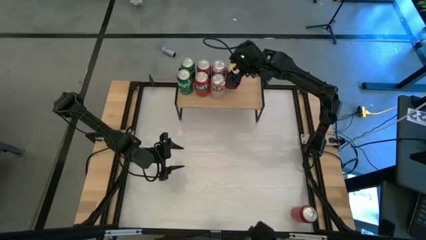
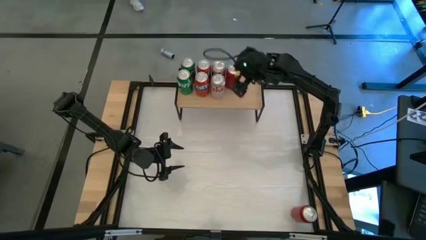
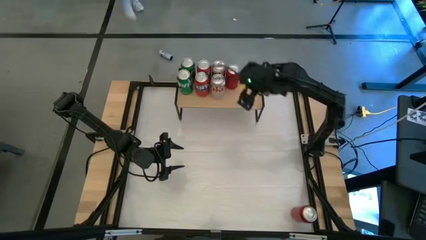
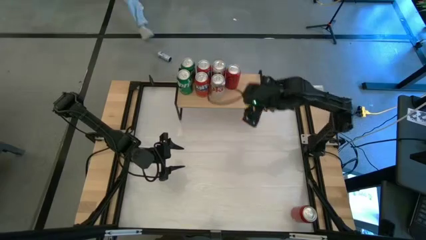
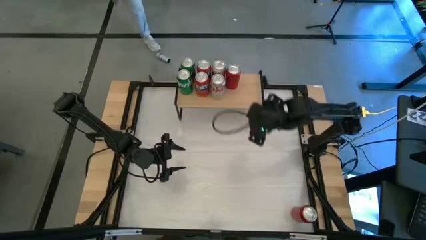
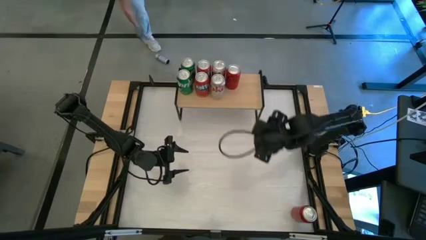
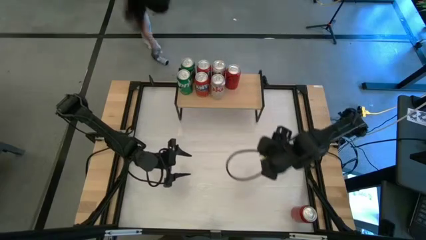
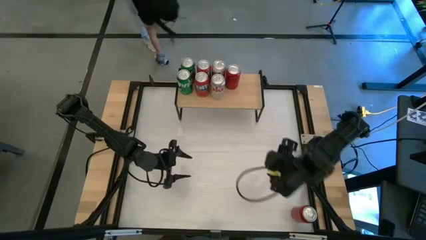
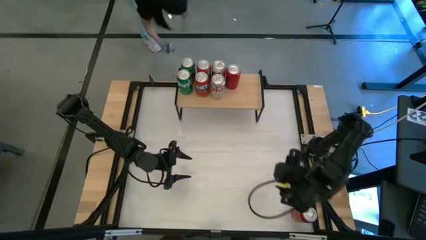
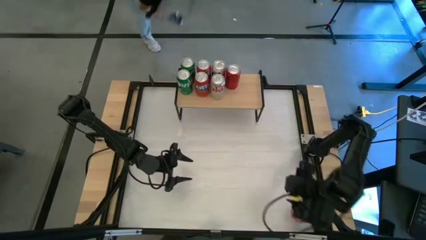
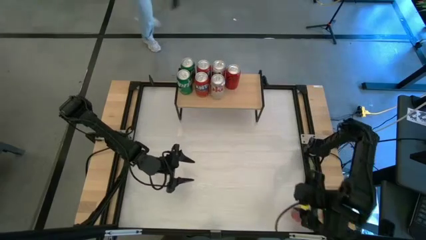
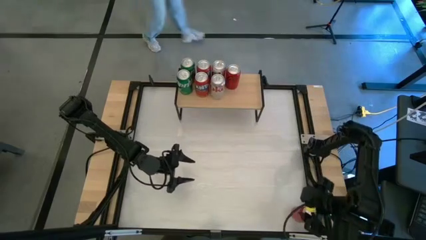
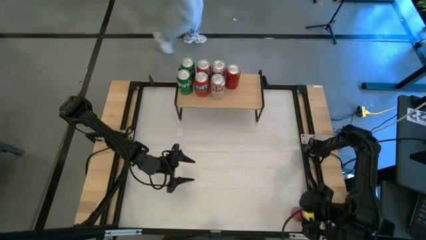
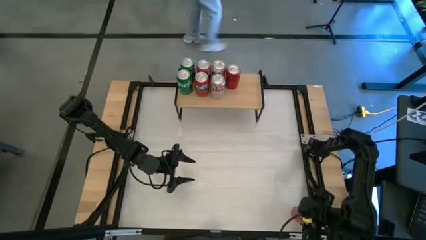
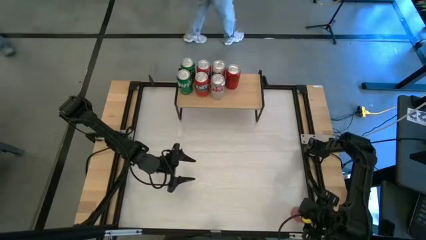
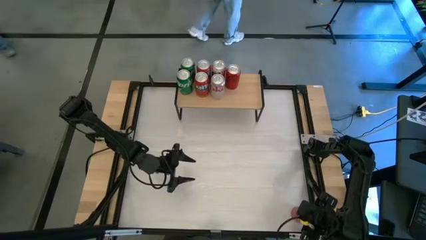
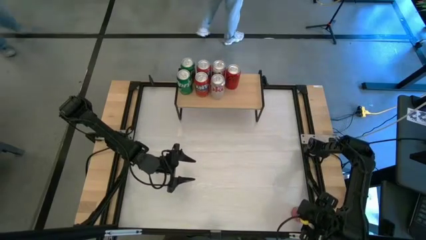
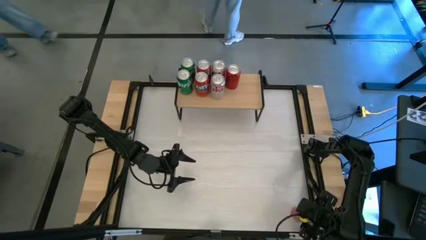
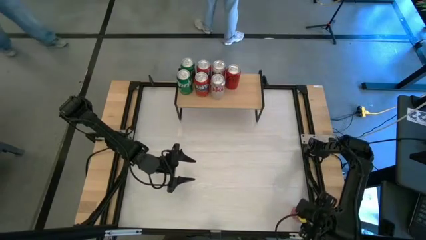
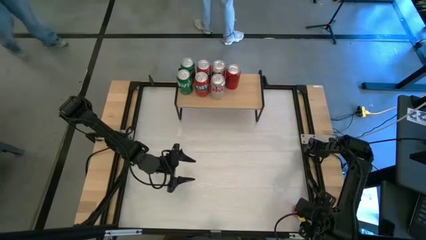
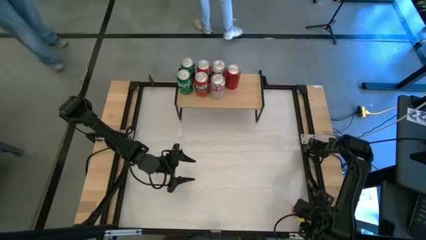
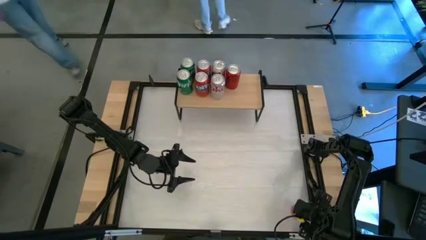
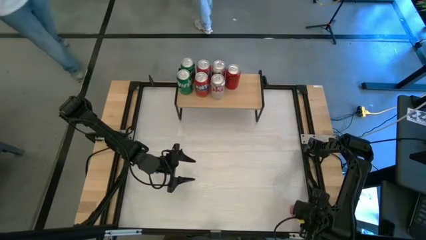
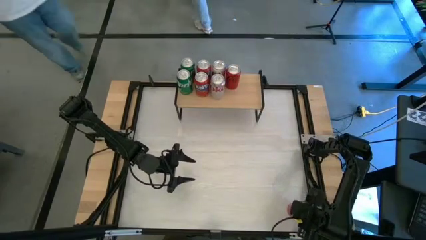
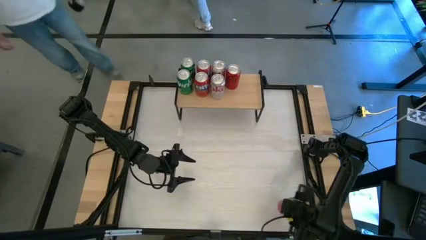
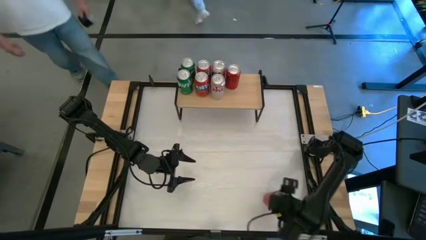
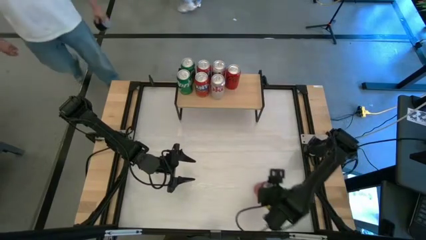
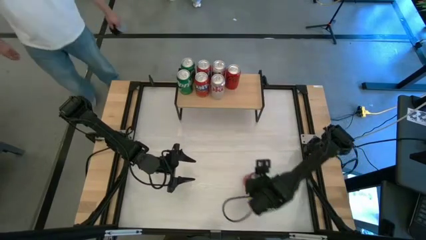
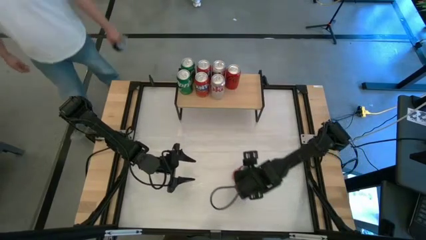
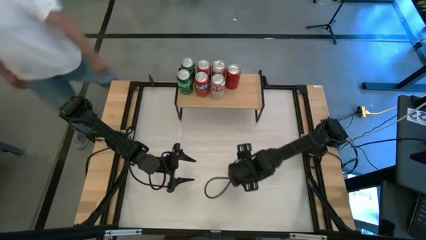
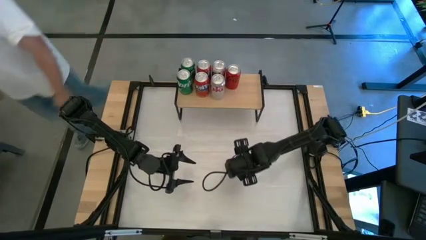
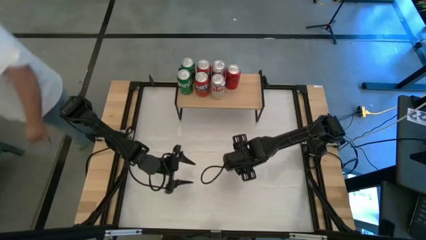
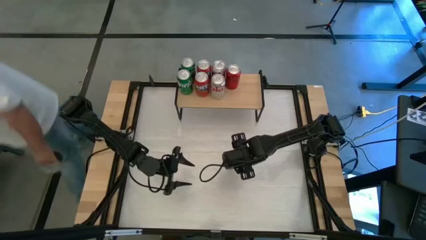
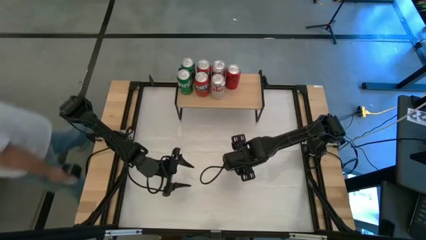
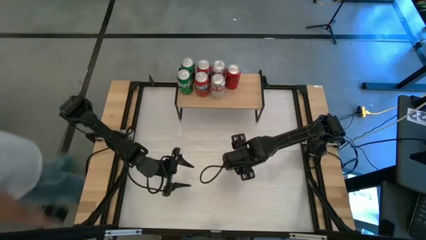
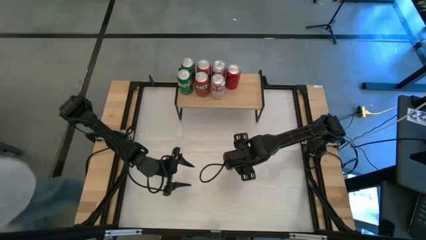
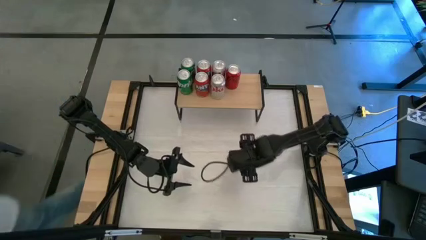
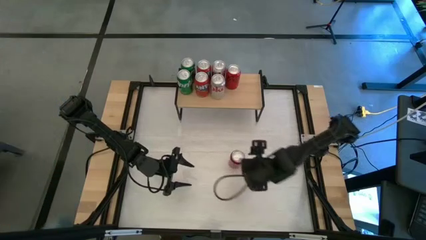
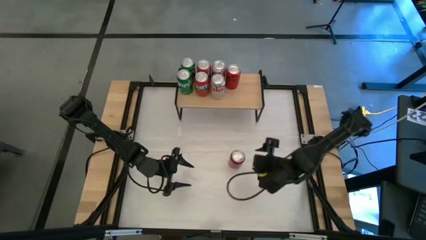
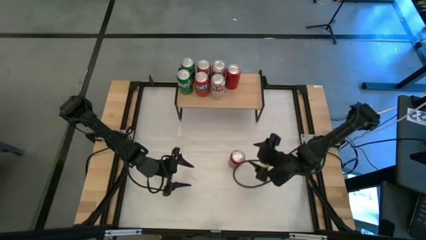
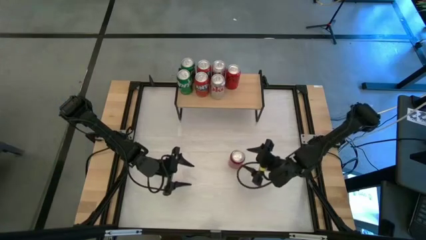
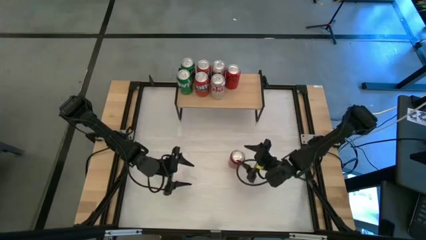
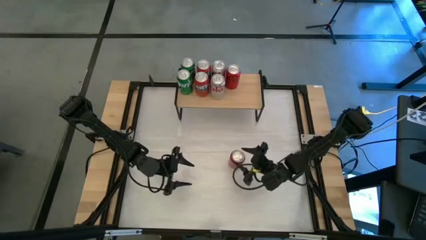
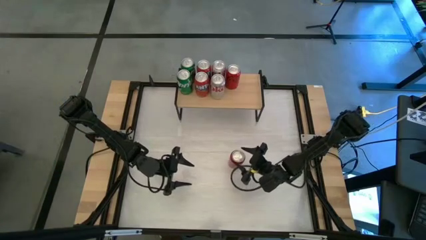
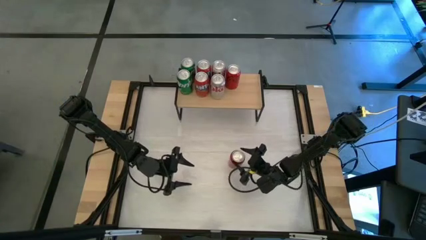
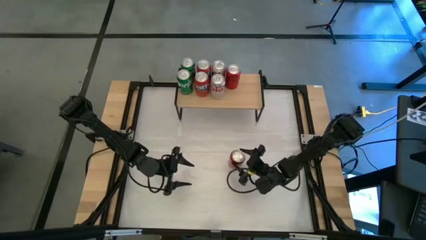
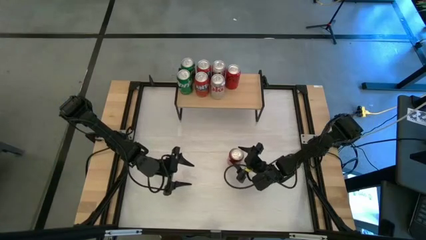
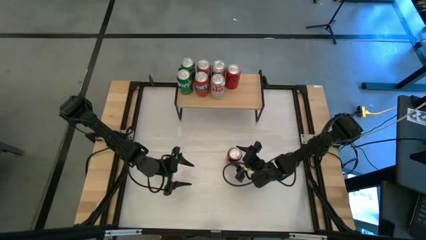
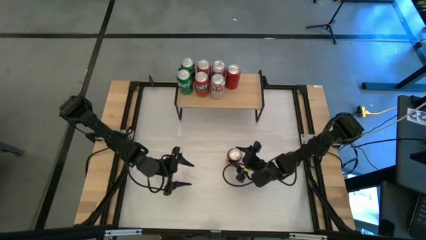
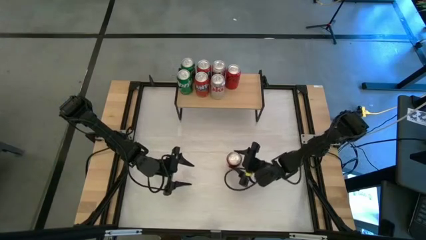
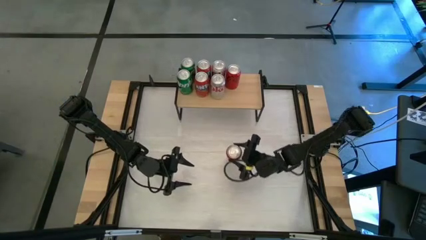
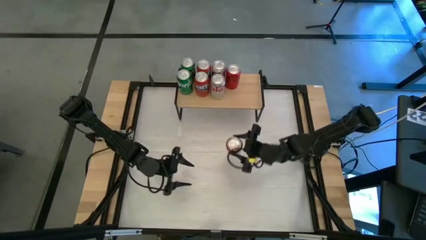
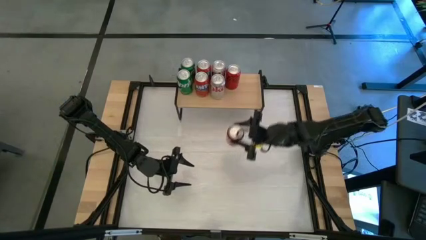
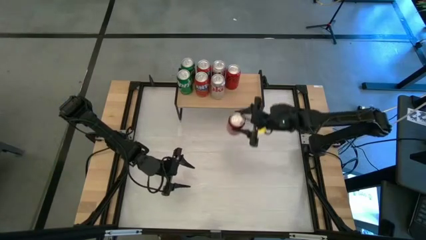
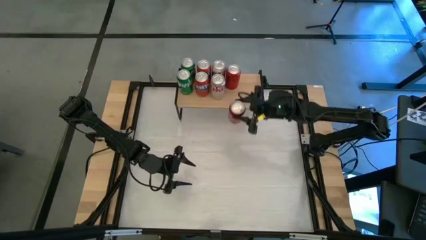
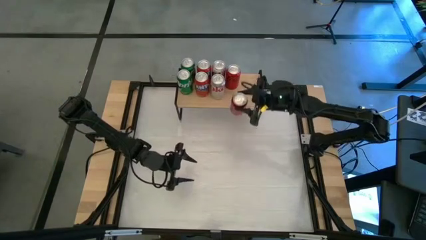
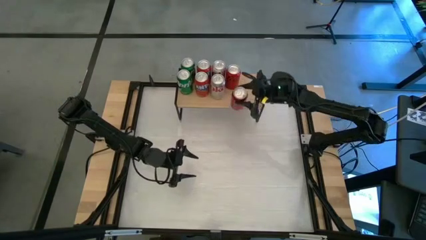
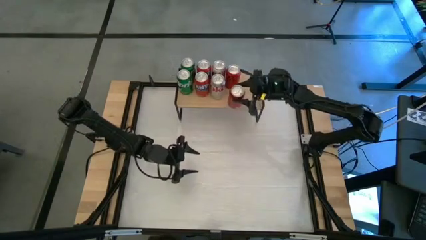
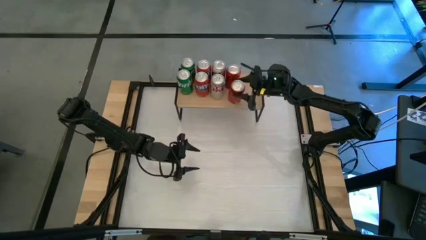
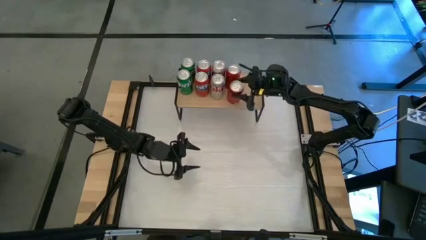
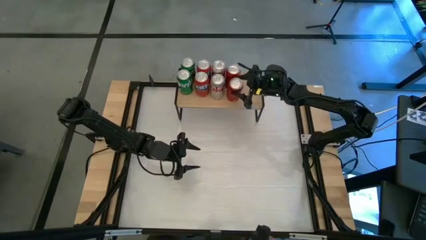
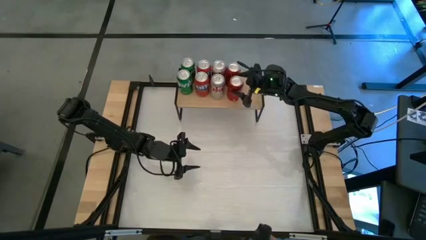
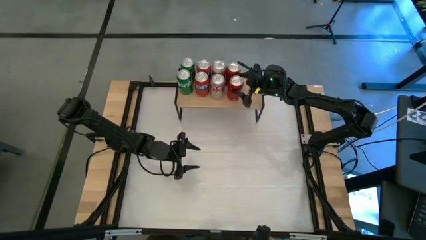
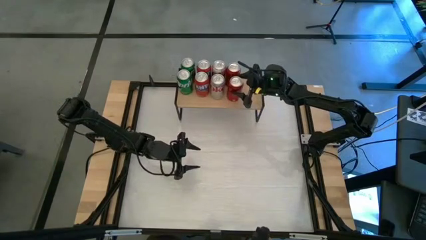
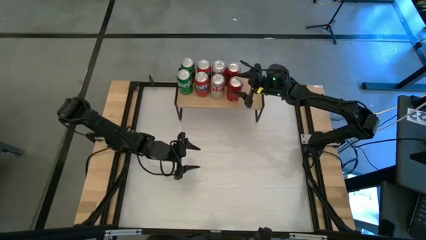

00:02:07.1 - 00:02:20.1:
Task: Place canned beverage on shelf
Put the red soda can on the shelf aligned with the other red soda can

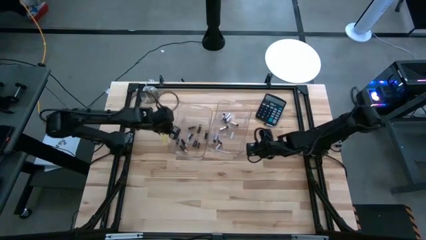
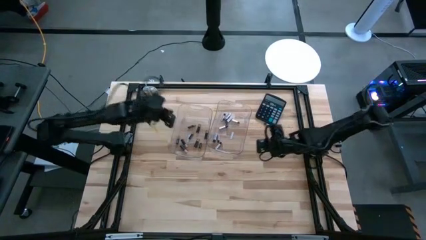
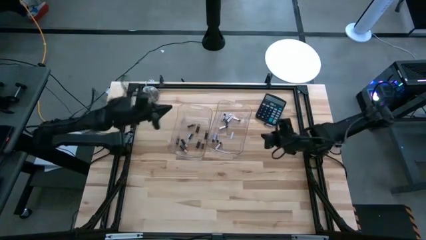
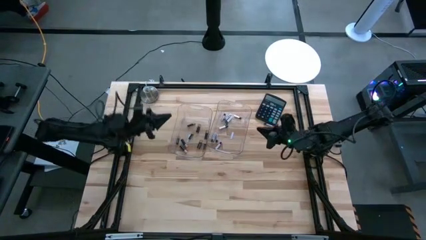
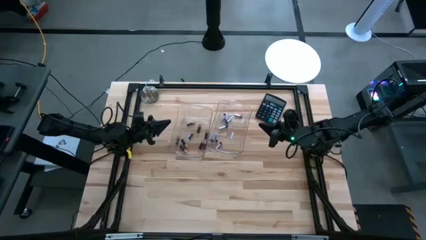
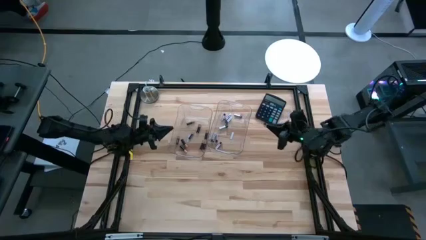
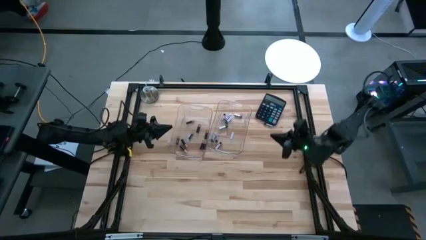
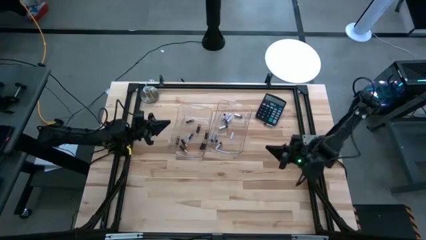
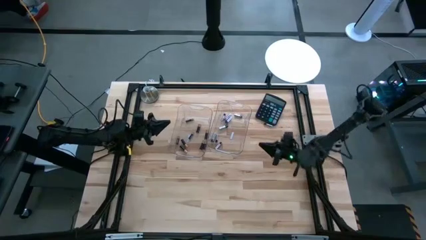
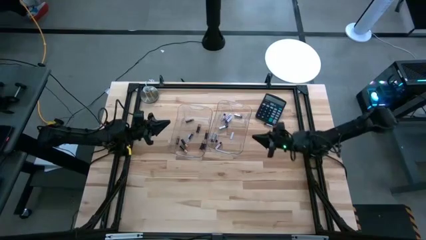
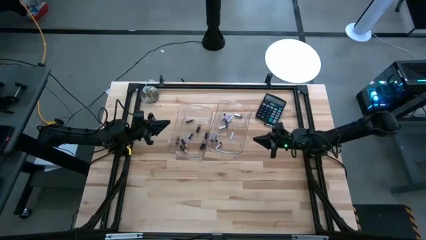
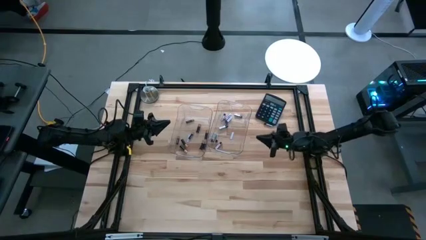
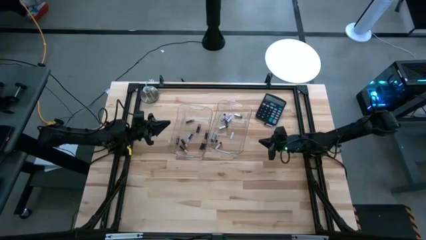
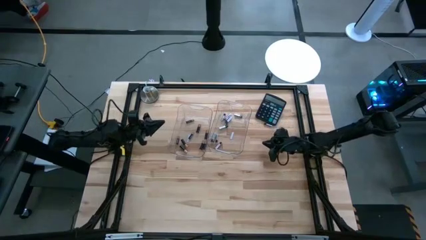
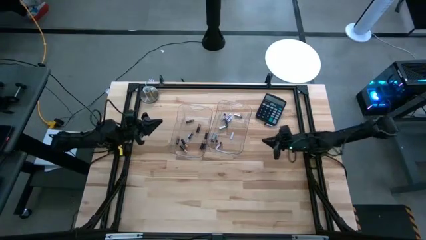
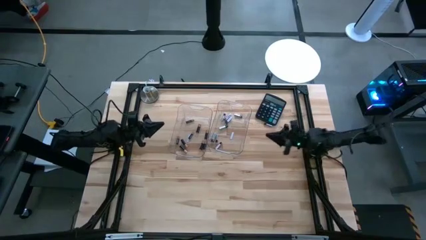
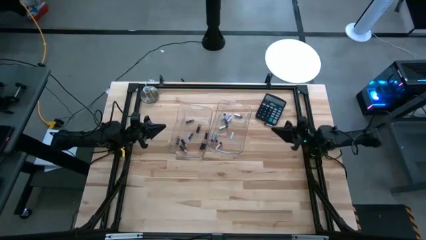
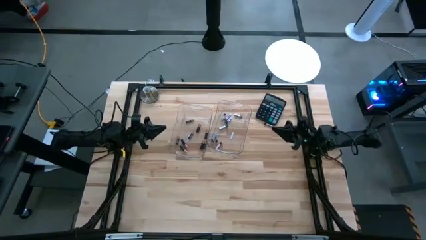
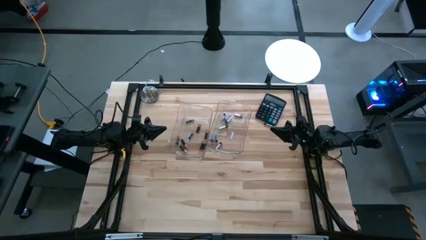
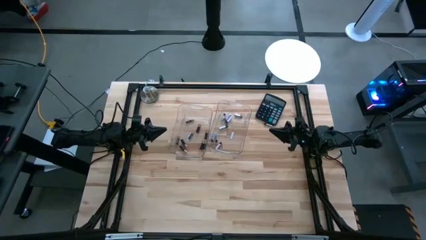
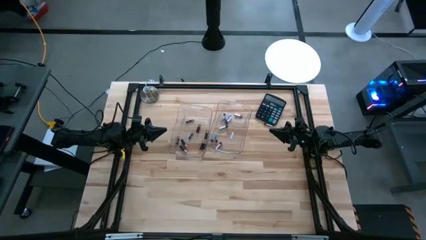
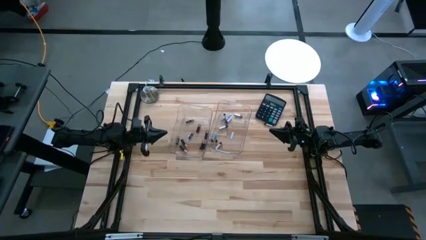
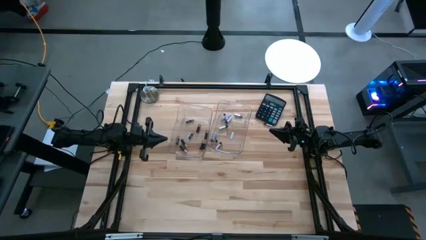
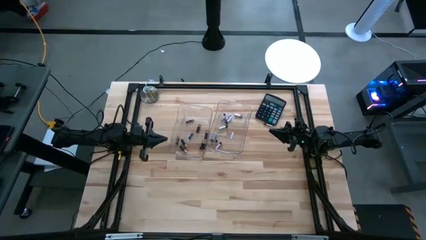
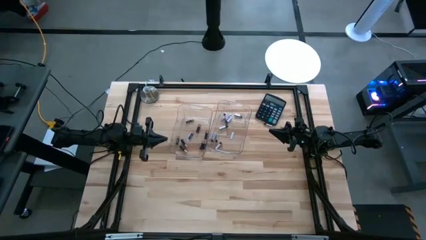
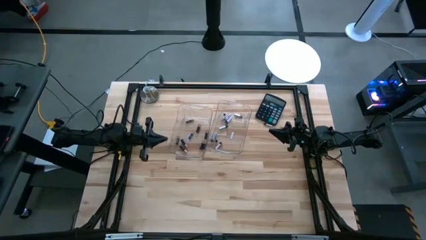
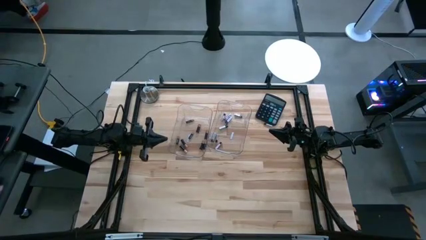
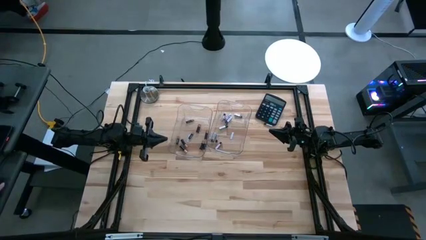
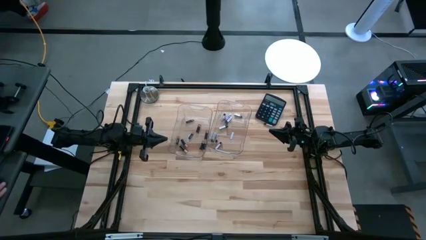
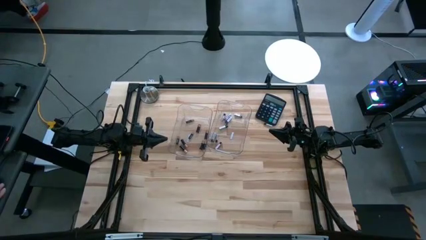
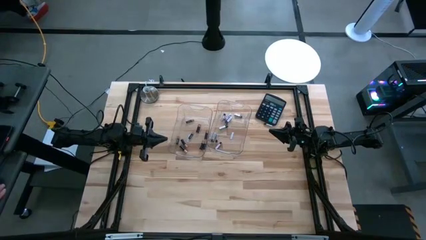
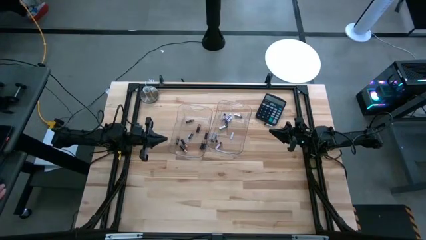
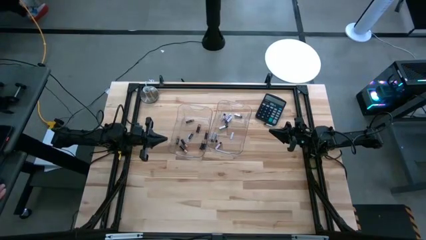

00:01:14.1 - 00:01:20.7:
Task: Sort batteries
Return to Home Position
